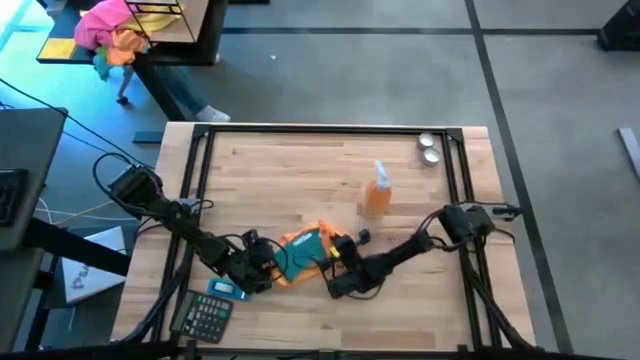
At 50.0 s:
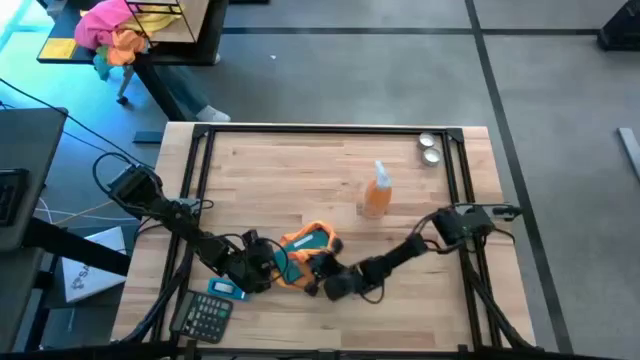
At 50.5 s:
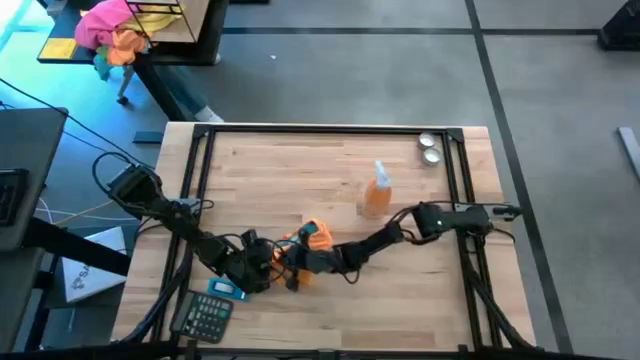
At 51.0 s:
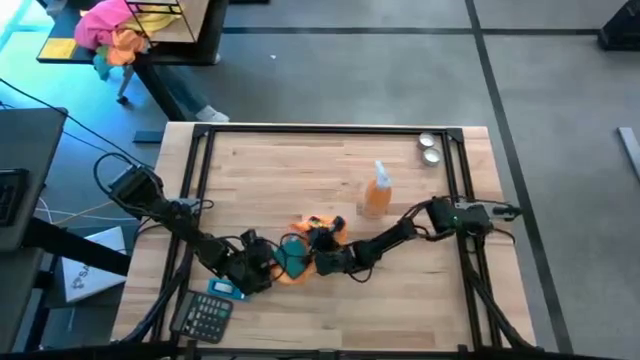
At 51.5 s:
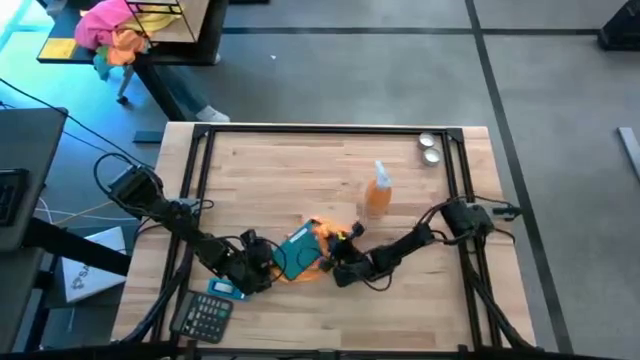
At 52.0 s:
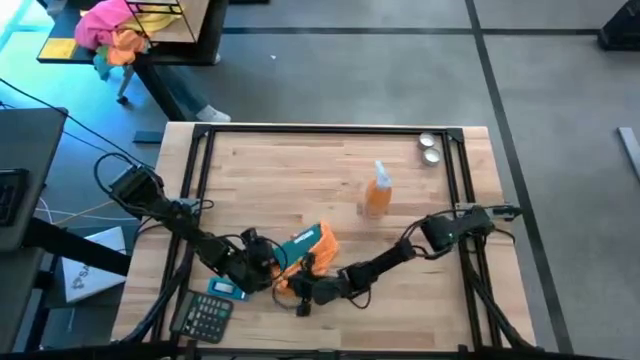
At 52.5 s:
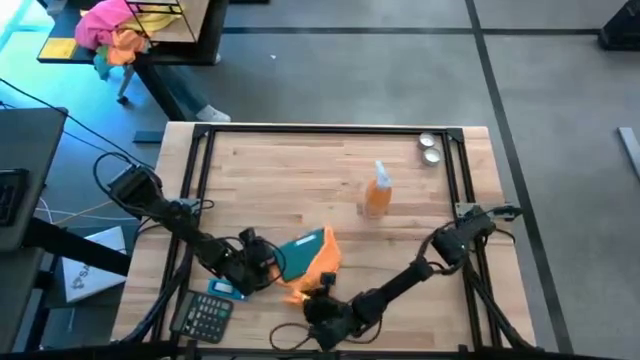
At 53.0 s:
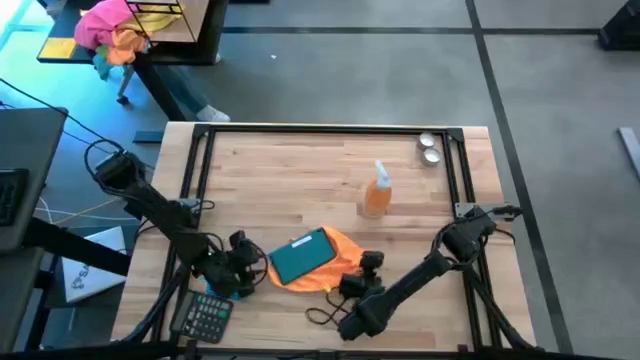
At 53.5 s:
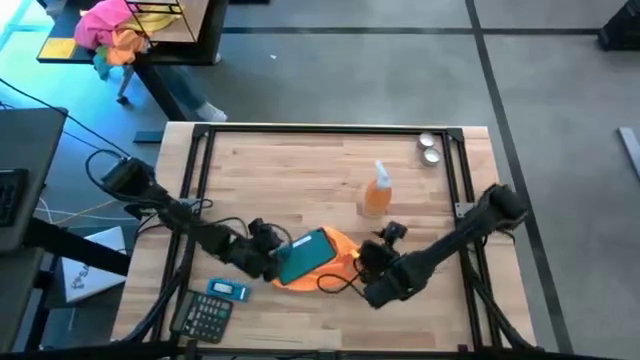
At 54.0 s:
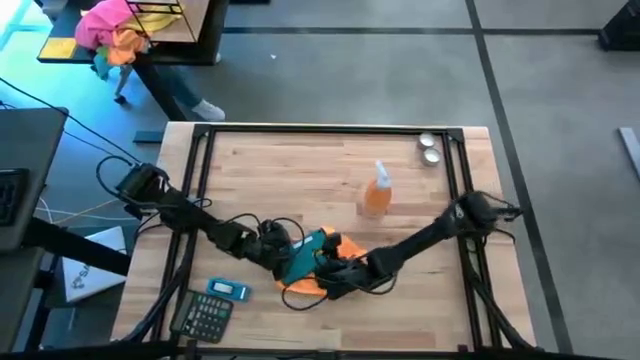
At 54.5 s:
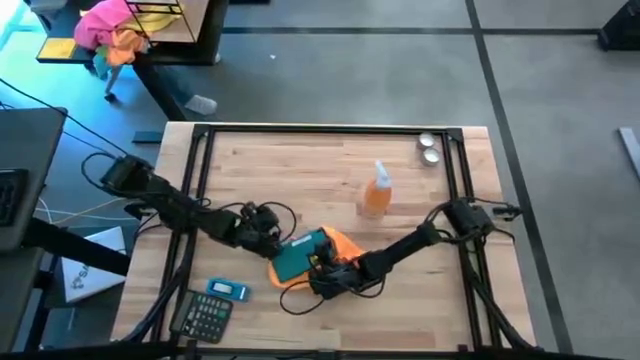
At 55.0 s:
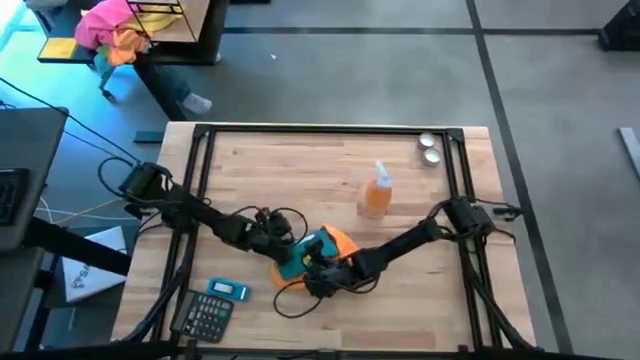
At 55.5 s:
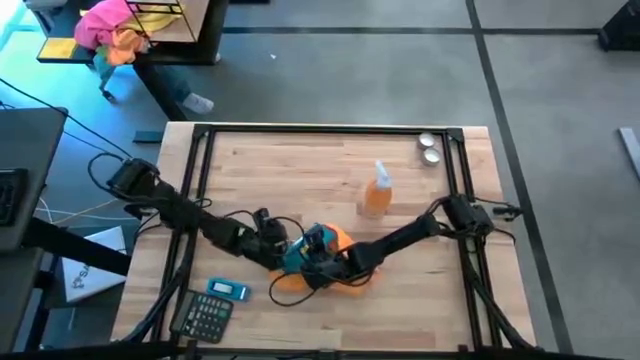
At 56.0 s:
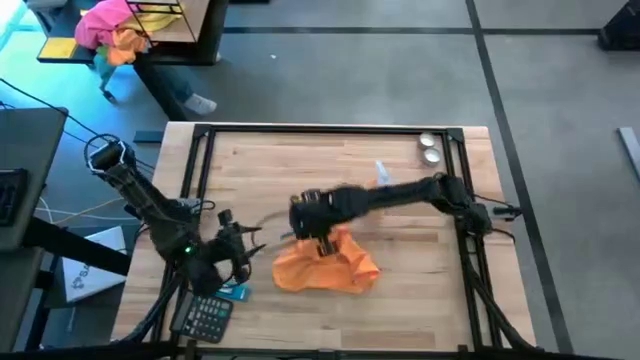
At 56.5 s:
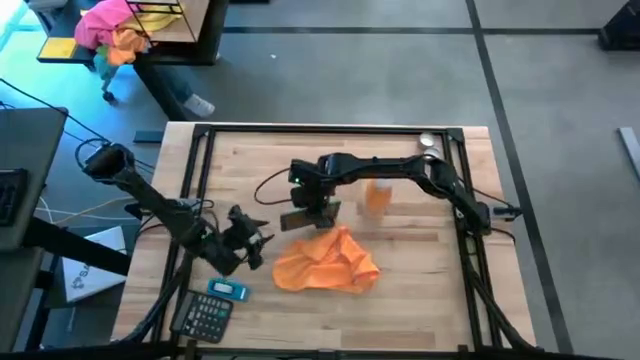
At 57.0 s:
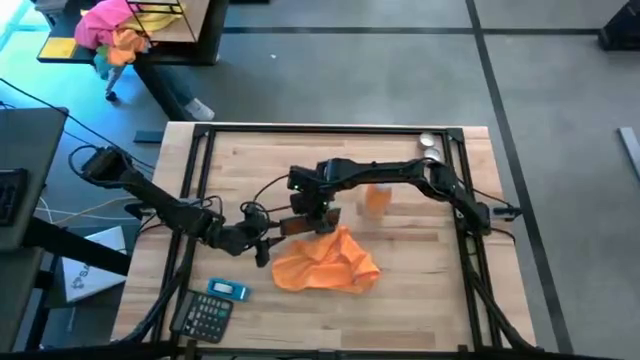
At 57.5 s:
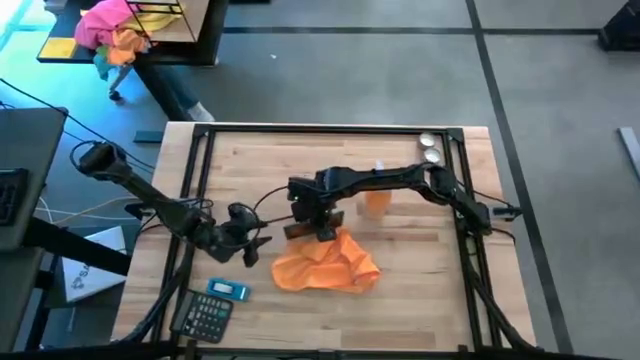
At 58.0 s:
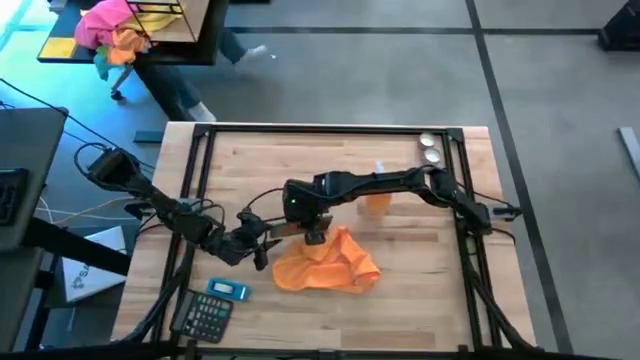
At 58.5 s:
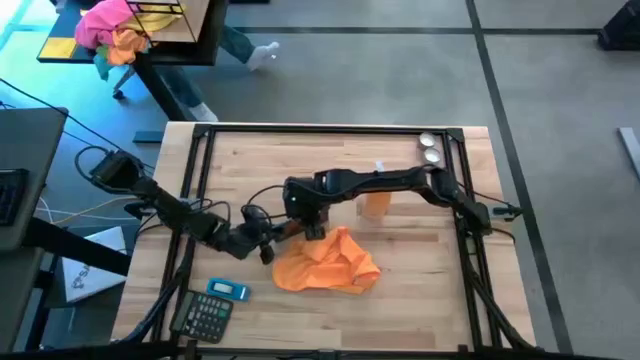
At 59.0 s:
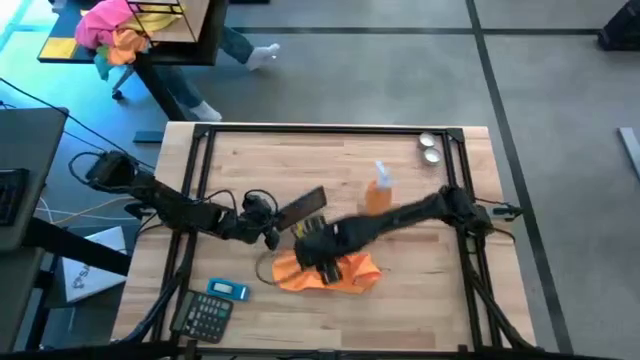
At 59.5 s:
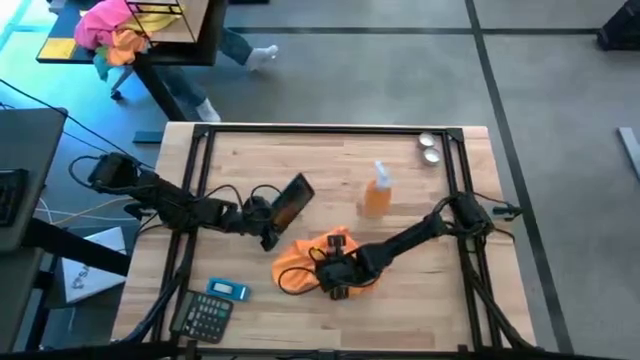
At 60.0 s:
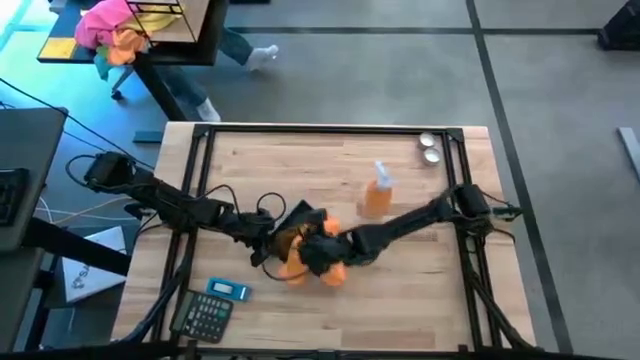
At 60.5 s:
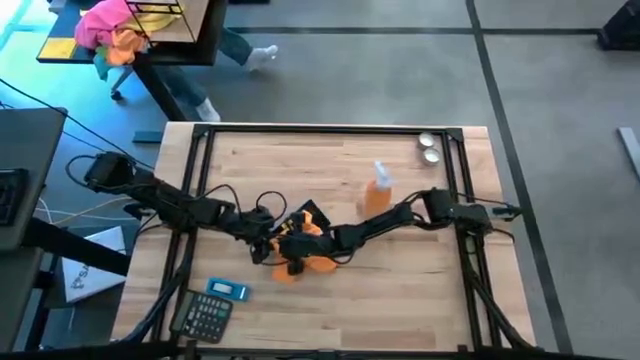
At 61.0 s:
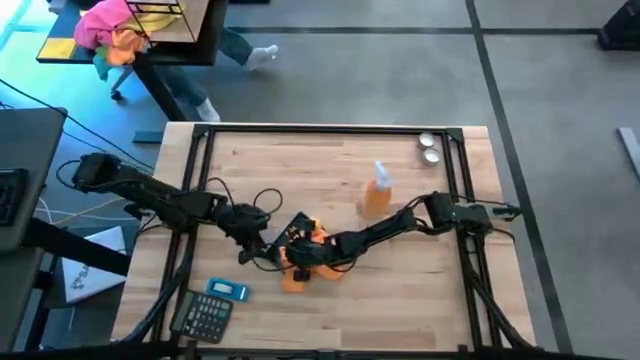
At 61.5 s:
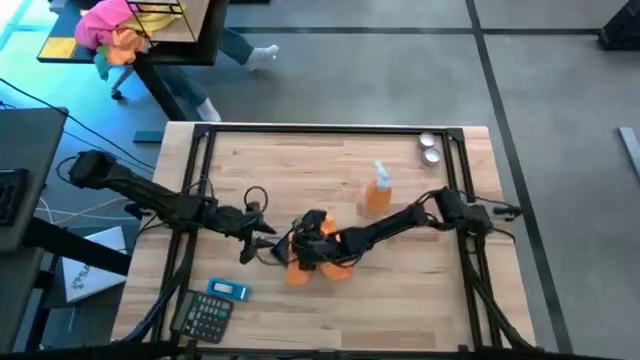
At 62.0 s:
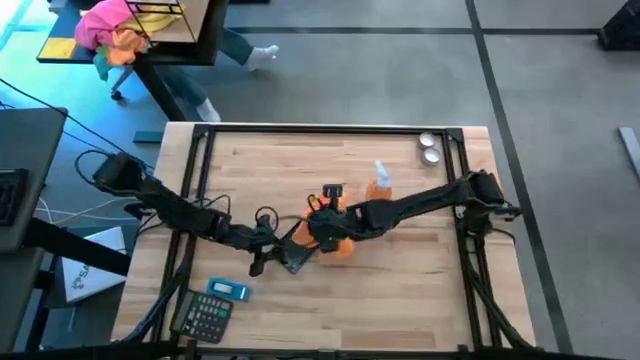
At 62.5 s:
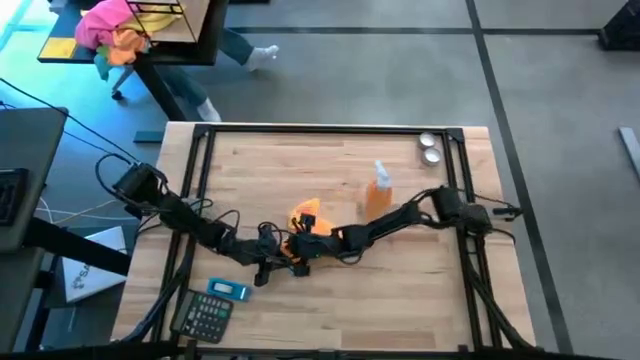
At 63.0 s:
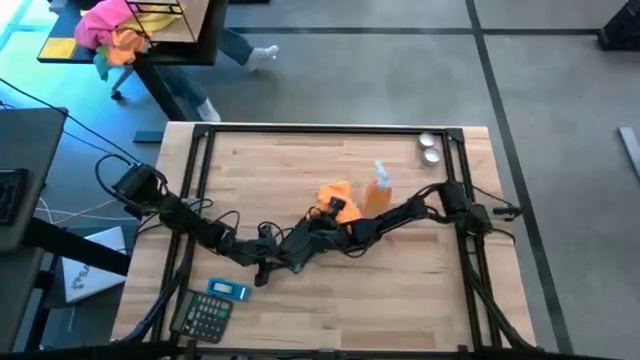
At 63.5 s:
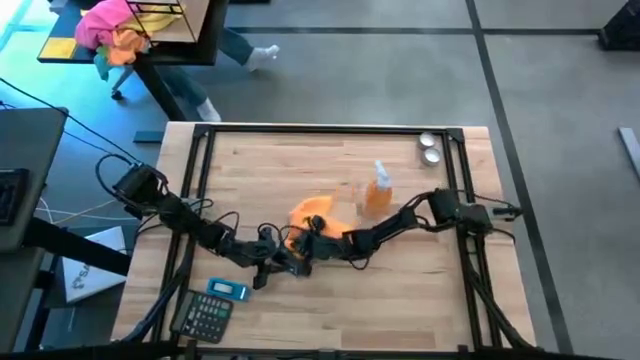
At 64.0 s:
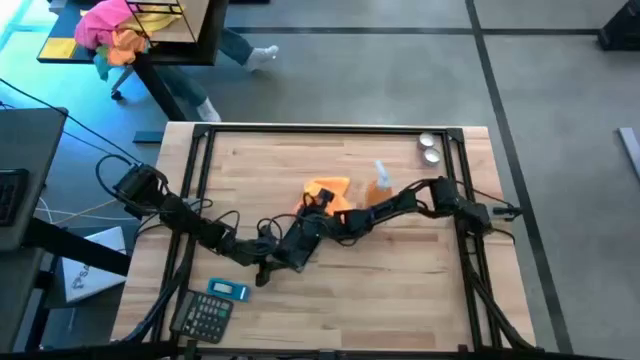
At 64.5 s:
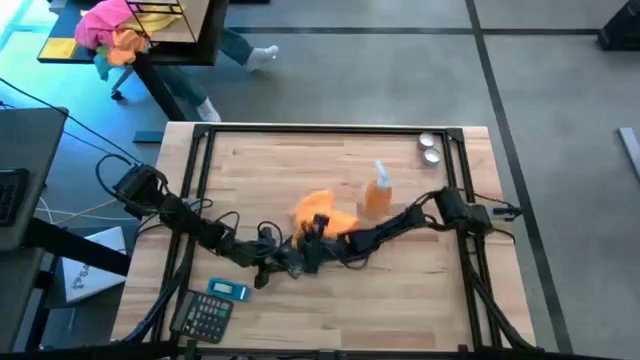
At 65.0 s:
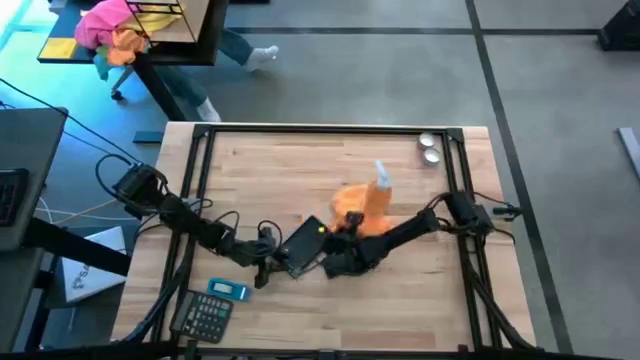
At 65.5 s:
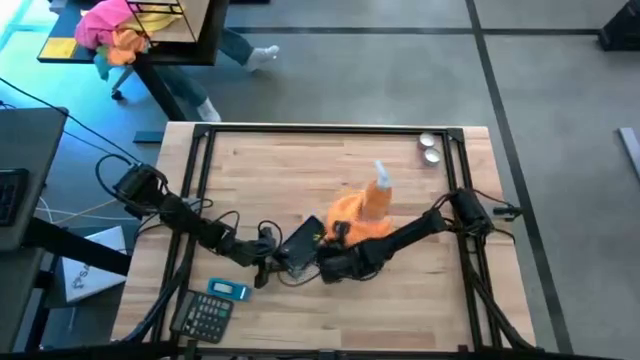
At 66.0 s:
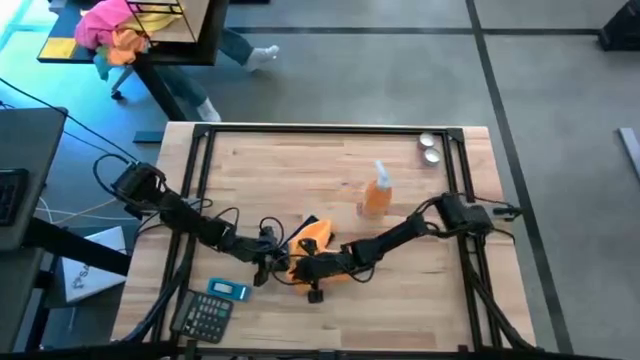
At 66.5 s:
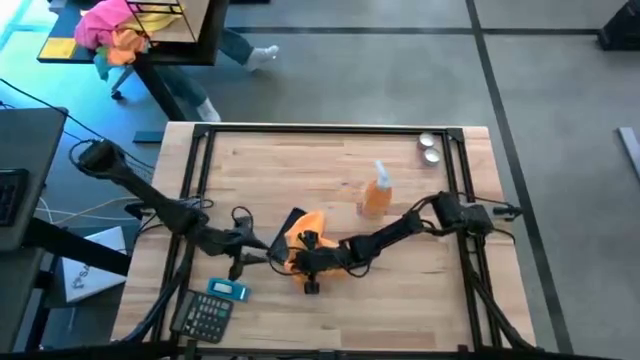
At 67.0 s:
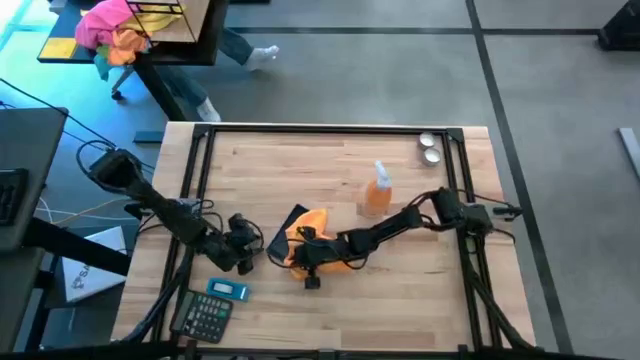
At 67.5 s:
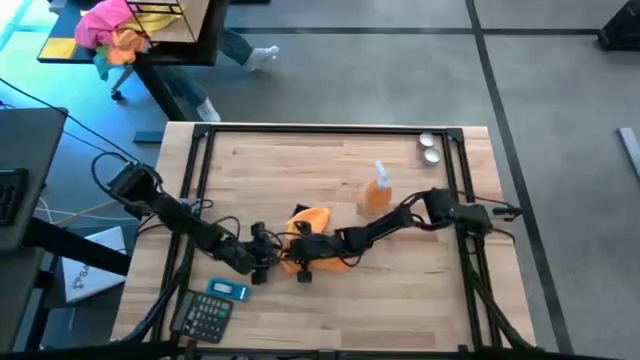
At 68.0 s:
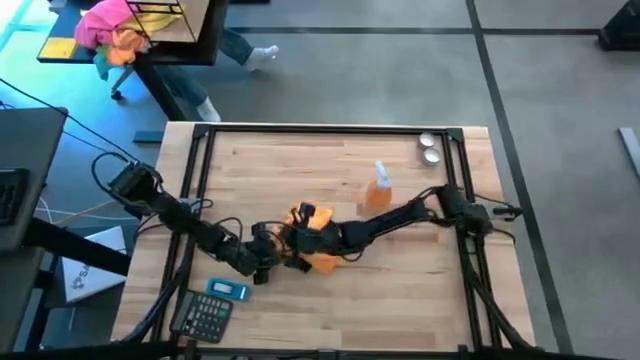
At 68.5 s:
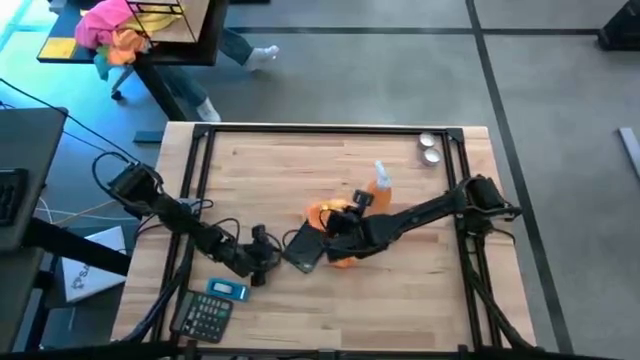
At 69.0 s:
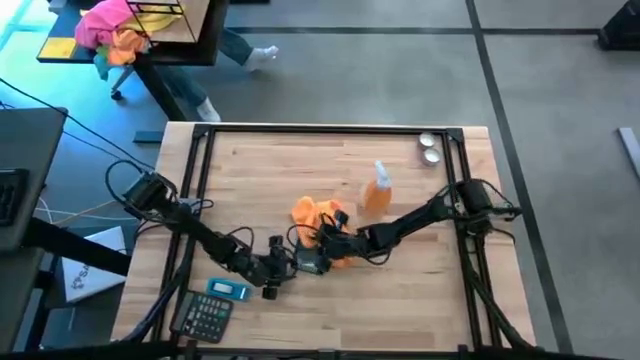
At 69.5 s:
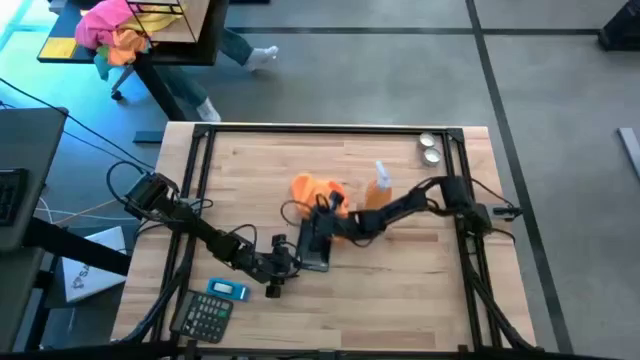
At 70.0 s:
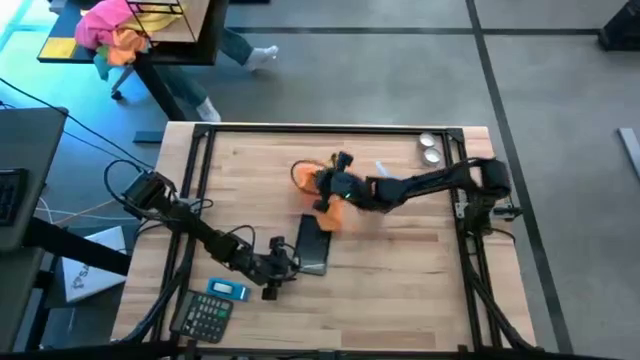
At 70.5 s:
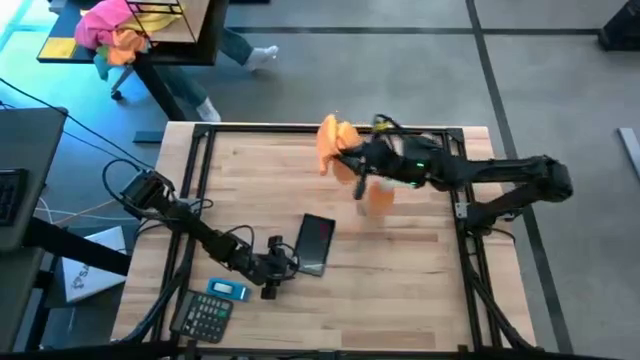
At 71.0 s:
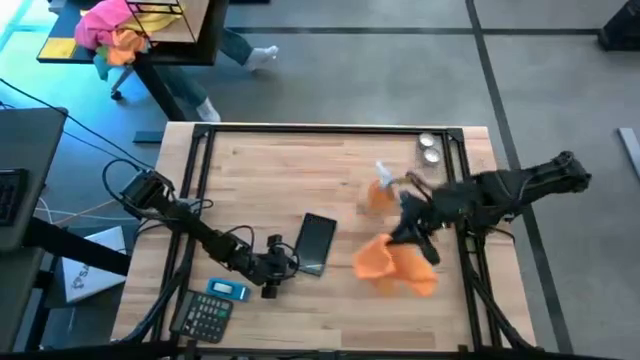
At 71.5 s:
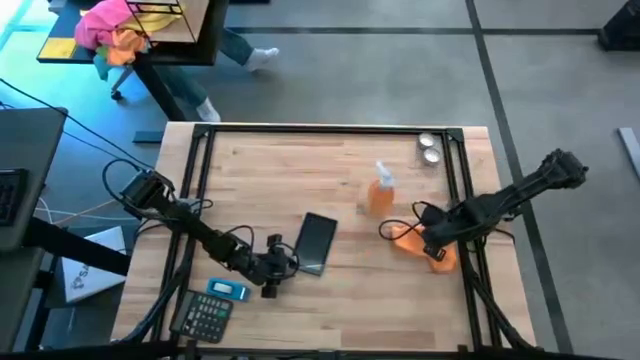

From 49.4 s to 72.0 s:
Task: Apply microfiber cloth
Wipe tablet with a microfiber cloth
